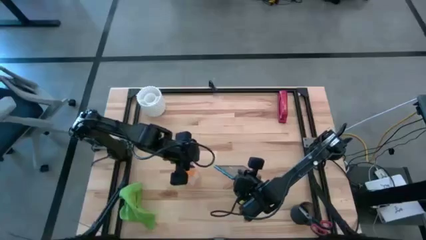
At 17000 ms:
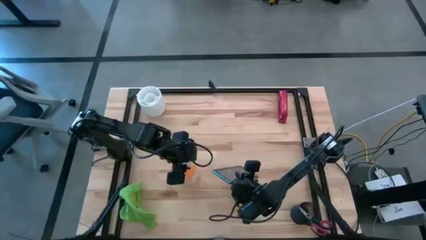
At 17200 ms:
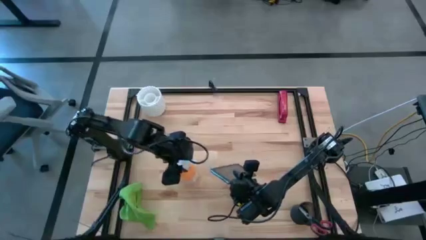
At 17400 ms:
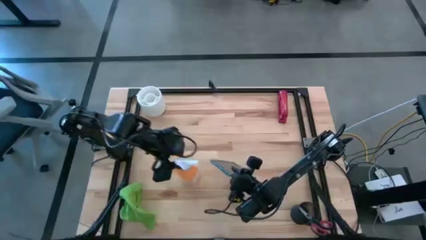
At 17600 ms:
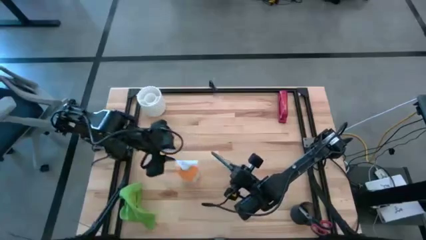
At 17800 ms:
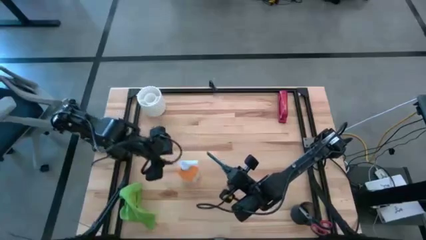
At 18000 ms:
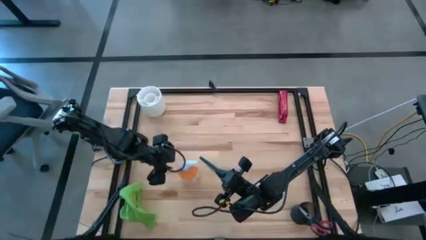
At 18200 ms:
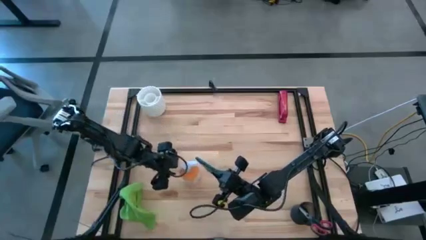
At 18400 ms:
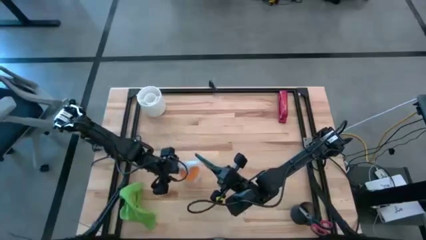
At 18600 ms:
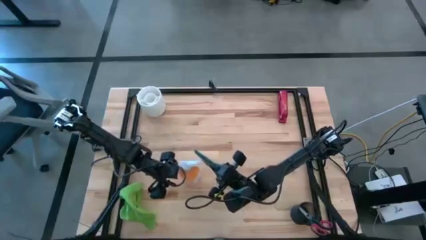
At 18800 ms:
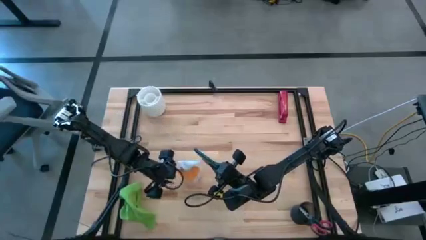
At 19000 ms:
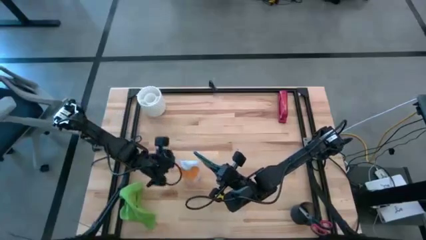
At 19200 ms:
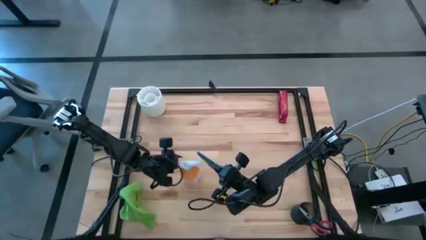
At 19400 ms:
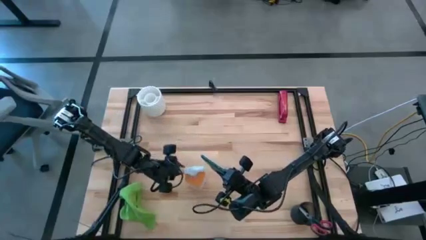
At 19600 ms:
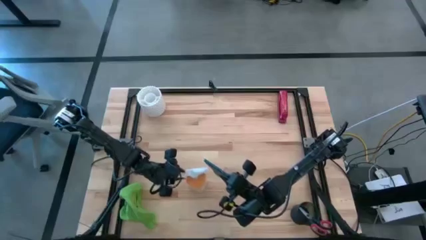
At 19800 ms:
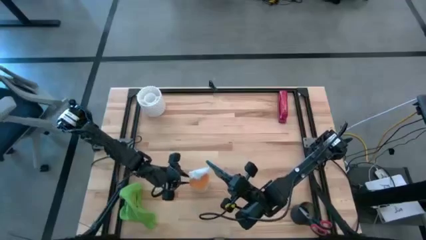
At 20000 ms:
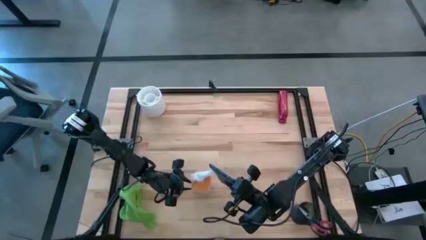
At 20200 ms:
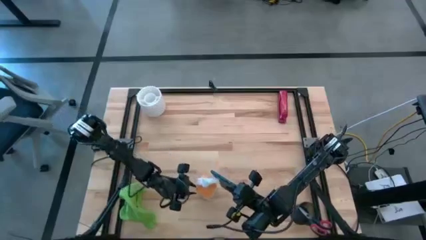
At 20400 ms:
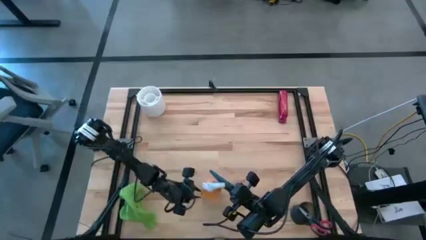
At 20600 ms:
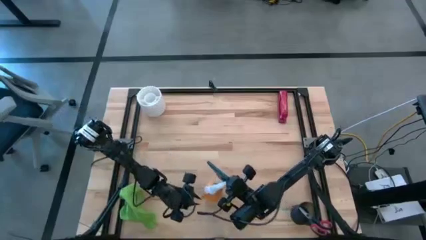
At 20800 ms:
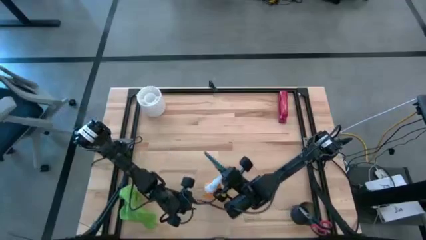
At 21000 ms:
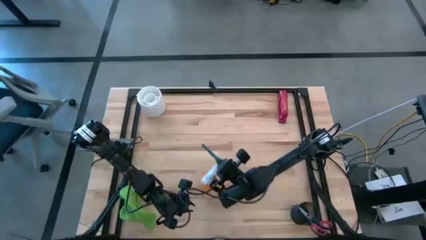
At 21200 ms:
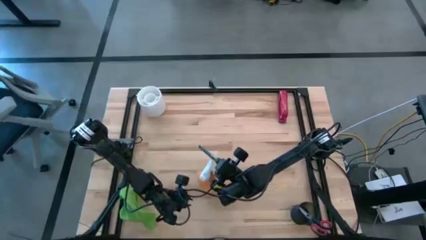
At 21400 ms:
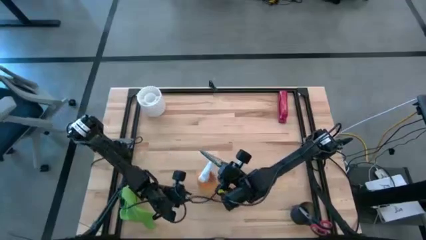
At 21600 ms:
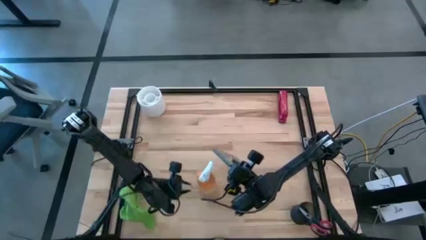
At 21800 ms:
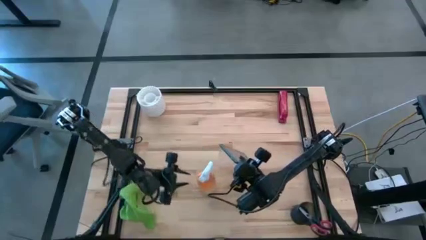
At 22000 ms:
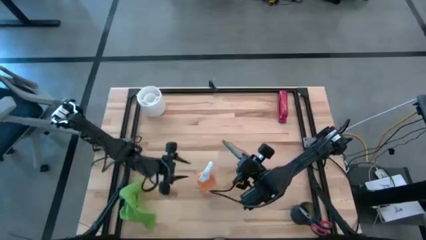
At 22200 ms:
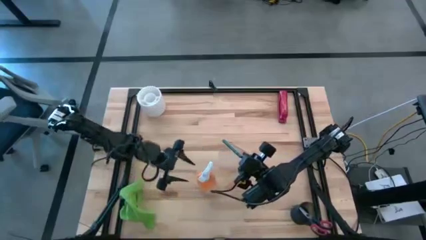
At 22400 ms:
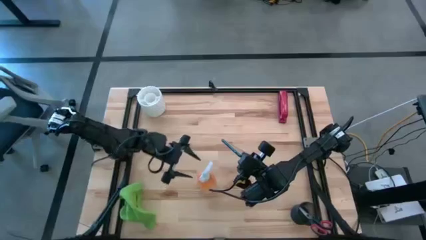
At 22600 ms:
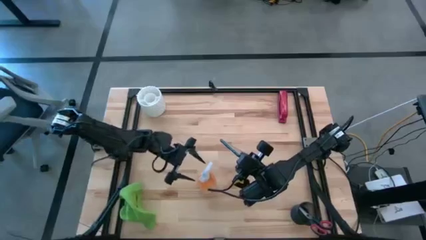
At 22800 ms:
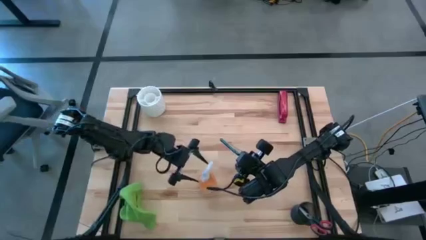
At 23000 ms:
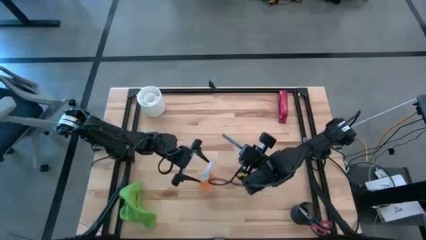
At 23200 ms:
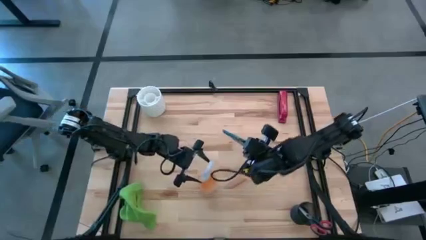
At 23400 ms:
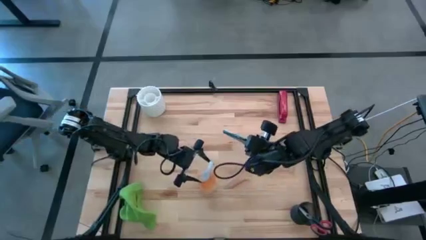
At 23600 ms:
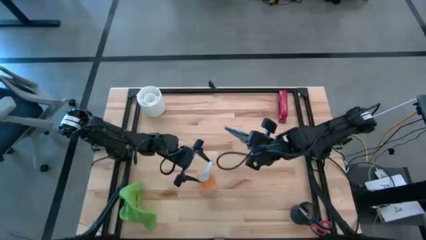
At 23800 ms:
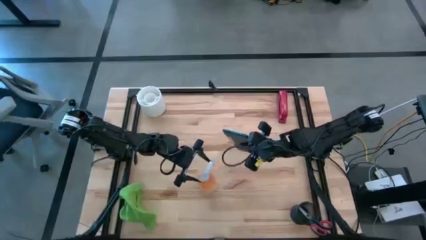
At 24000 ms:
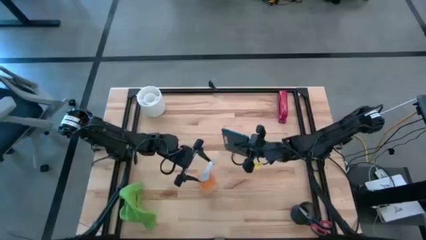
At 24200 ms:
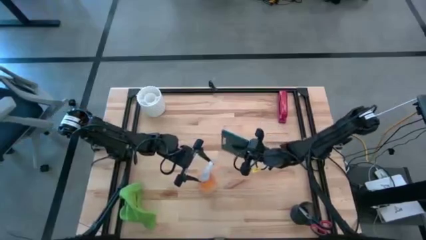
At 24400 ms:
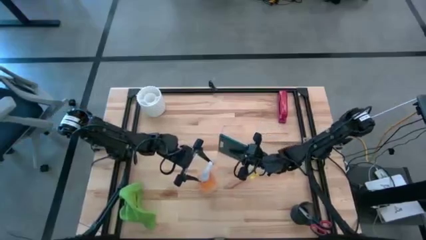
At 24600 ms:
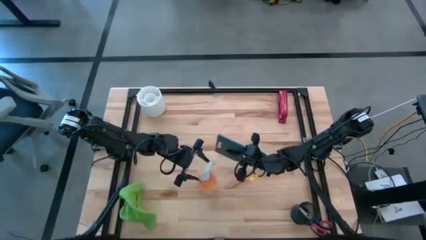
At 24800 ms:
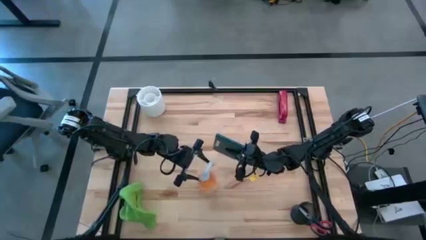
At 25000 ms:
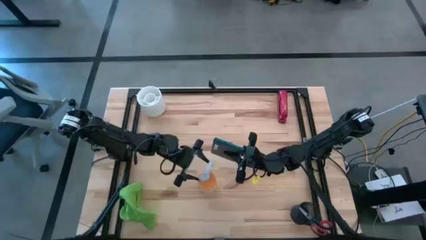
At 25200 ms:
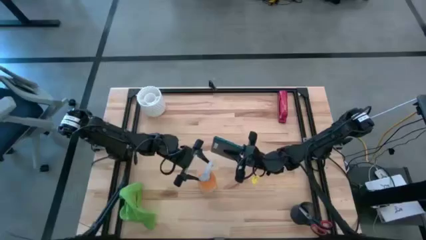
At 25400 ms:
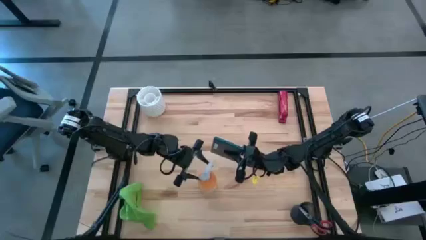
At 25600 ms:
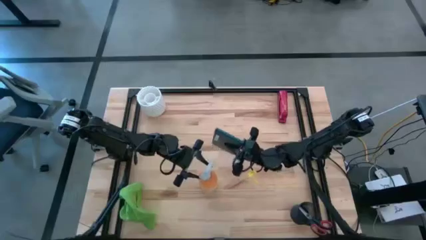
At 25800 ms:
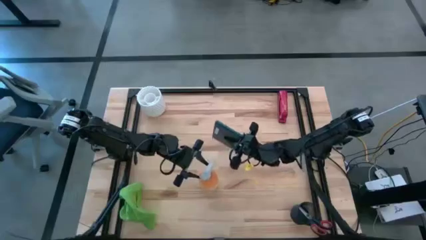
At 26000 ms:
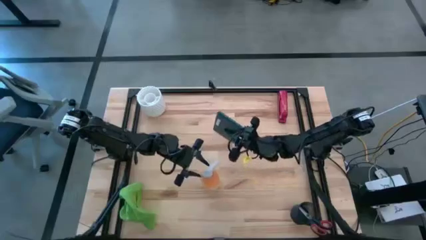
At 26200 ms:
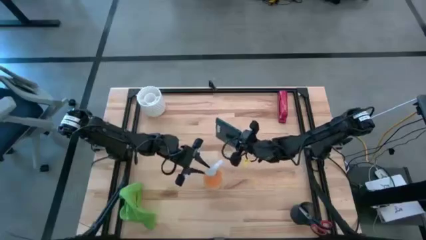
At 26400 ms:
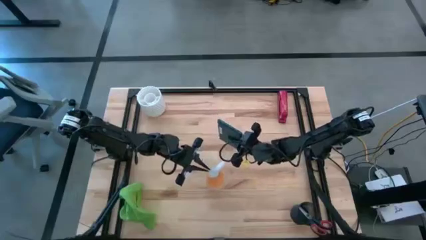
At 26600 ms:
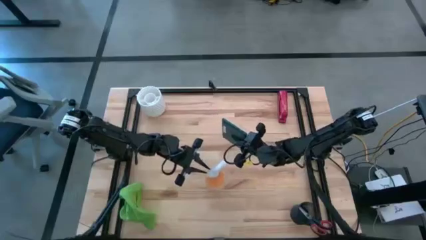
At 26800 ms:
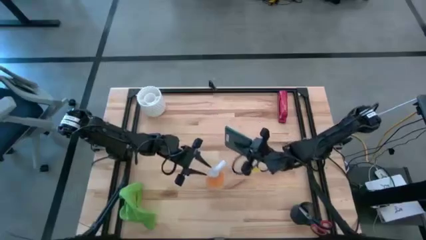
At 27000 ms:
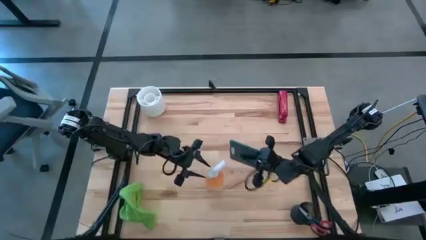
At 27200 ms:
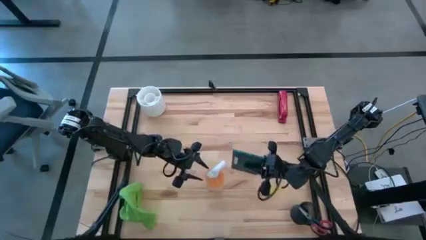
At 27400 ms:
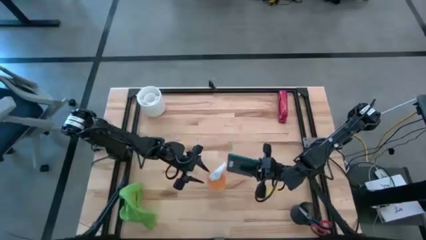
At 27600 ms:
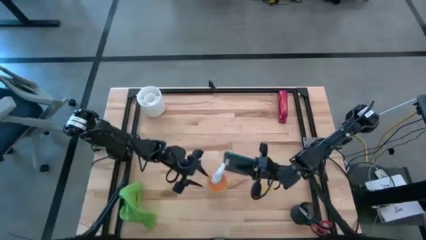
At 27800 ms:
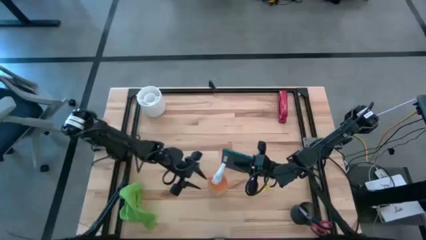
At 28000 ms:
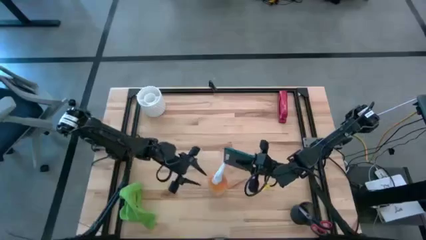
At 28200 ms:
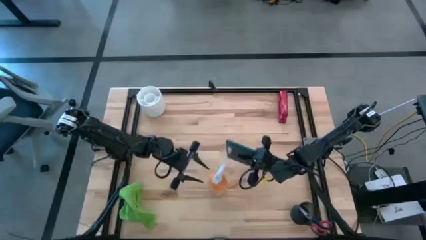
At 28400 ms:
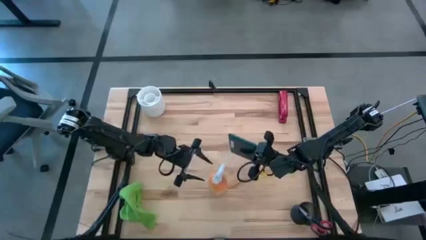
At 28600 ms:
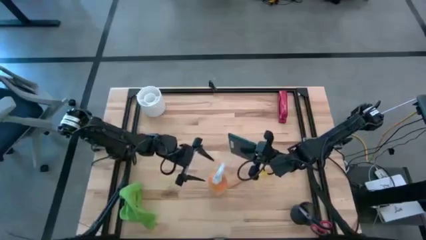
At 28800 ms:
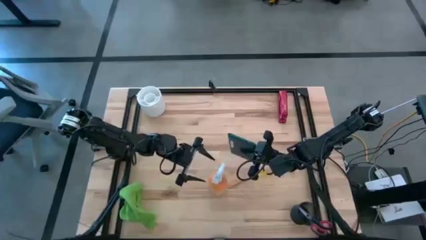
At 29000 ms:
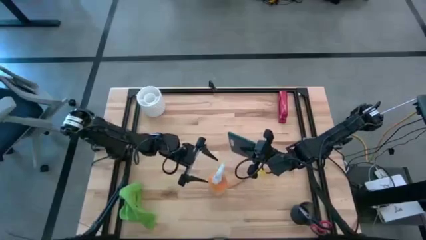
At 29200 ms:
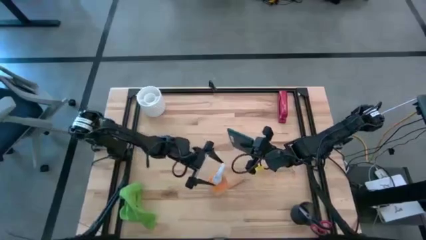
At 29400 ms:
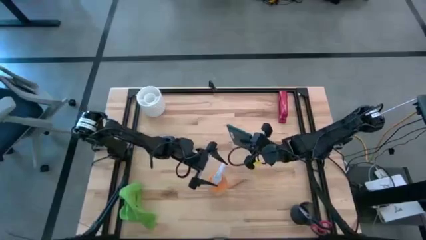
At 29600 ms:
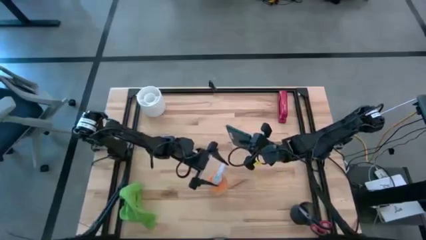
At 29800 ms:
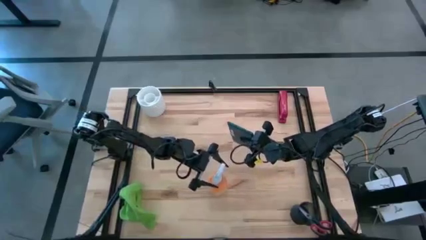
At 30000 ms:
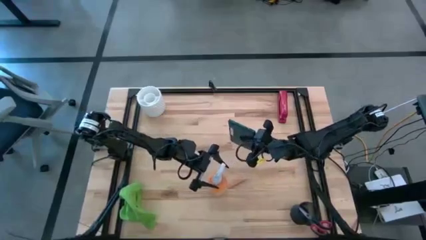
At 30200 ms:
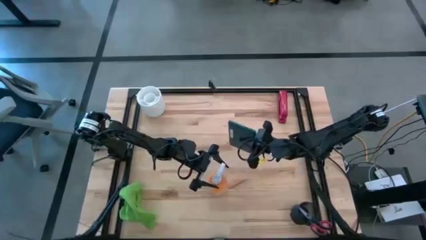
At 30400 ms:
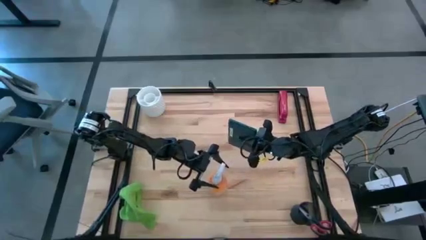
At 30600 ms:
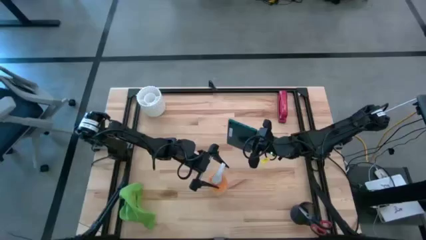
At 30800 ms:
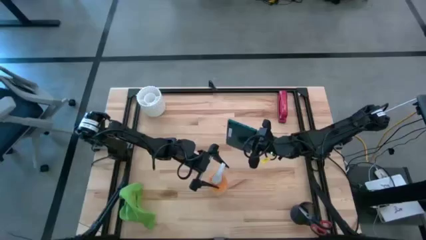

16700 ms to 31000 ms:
Task: Apply microfiber cloth
Spray the blue tablet with the orange spray bottle
